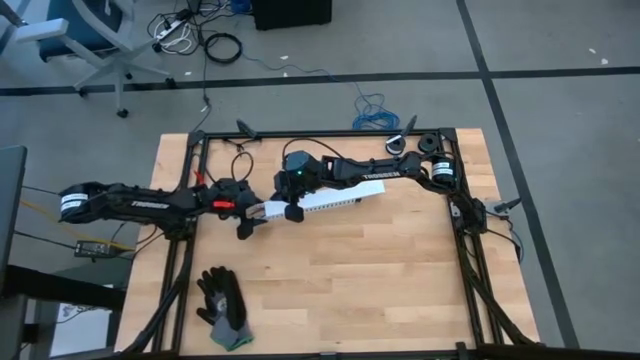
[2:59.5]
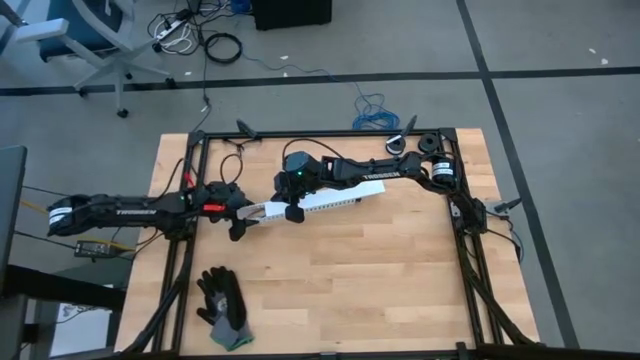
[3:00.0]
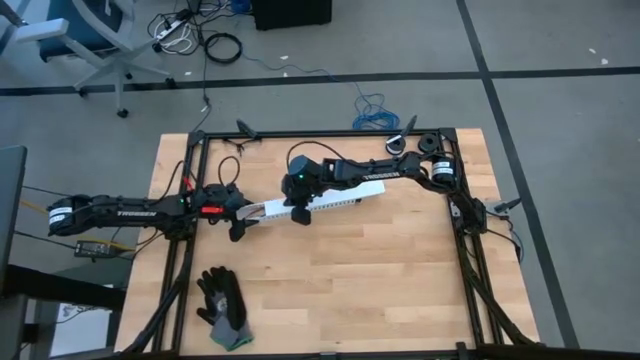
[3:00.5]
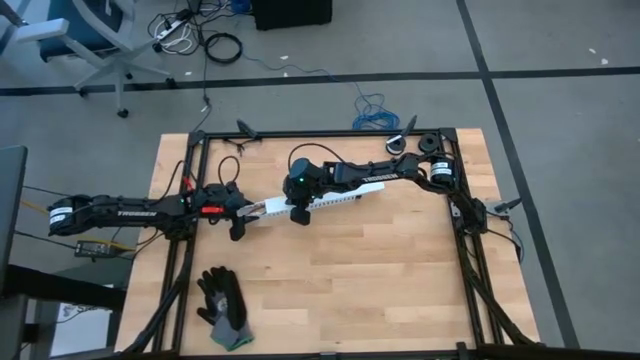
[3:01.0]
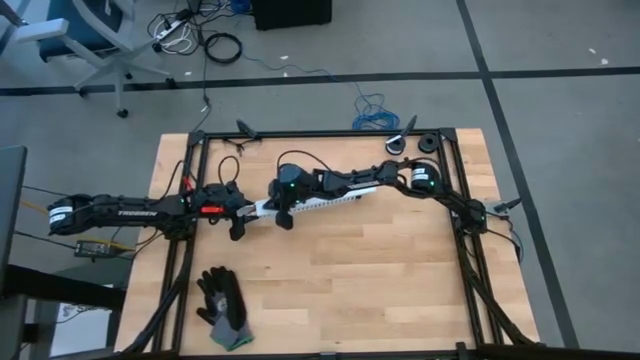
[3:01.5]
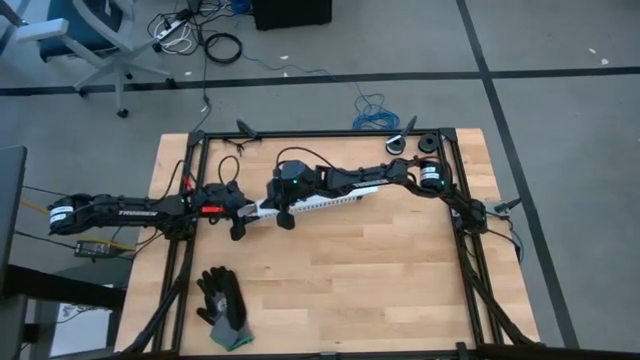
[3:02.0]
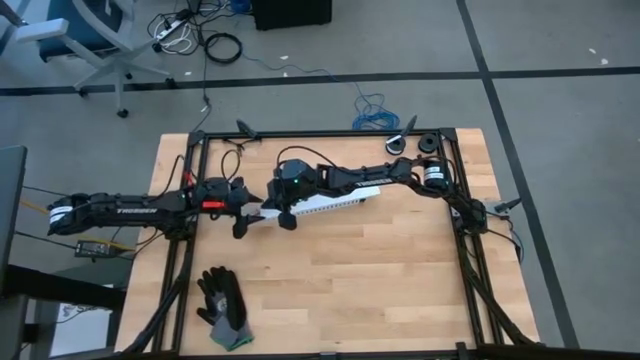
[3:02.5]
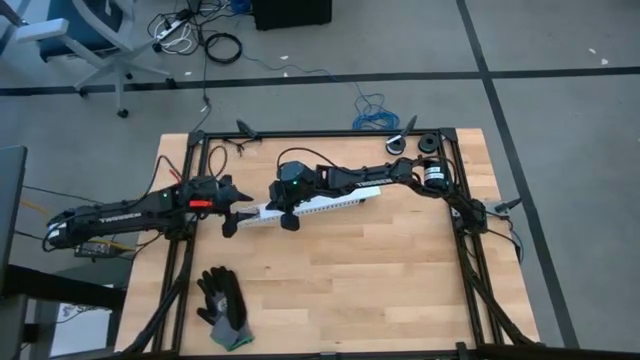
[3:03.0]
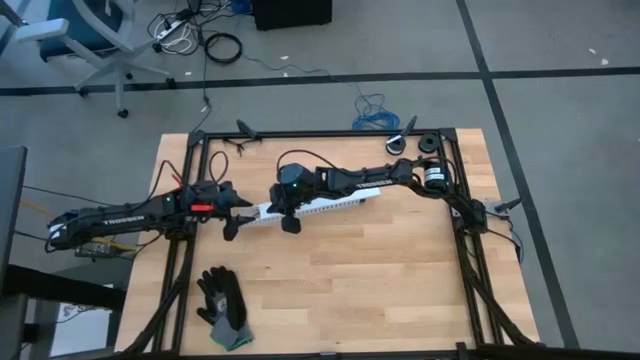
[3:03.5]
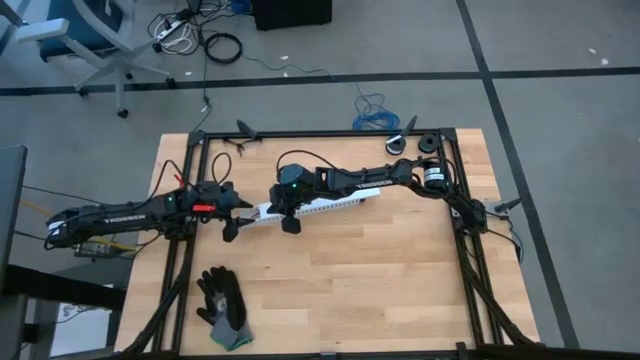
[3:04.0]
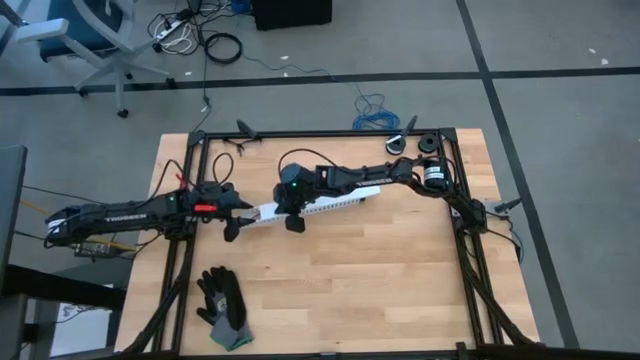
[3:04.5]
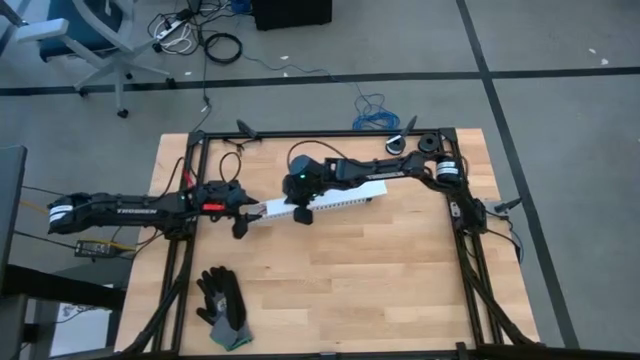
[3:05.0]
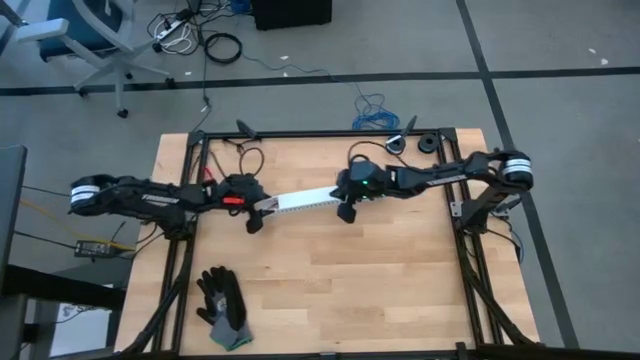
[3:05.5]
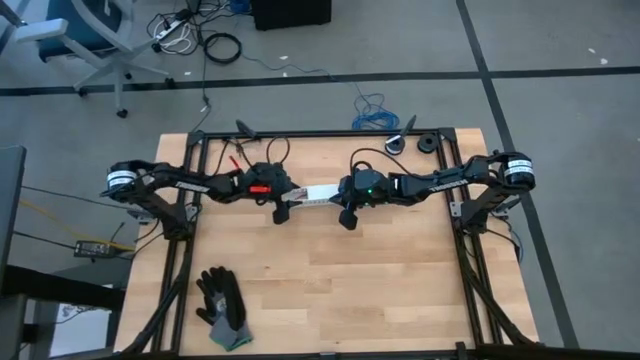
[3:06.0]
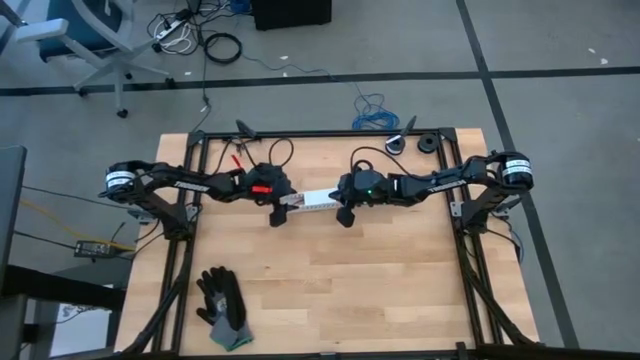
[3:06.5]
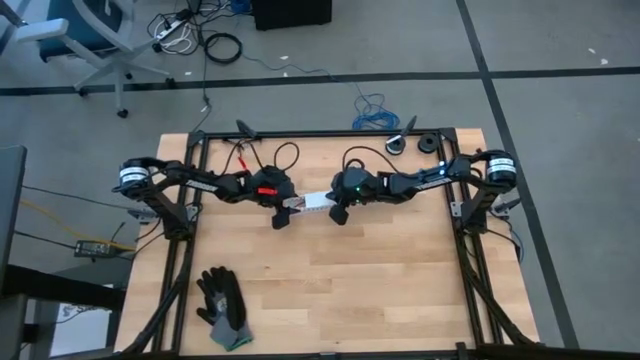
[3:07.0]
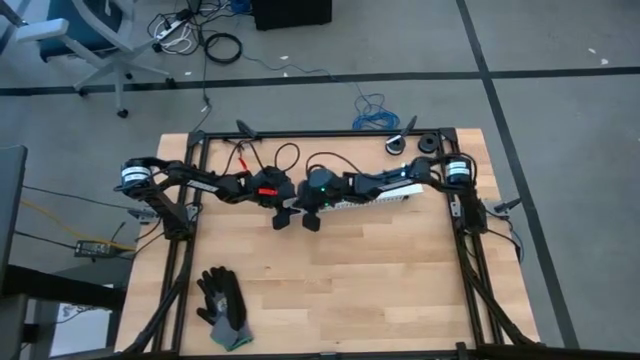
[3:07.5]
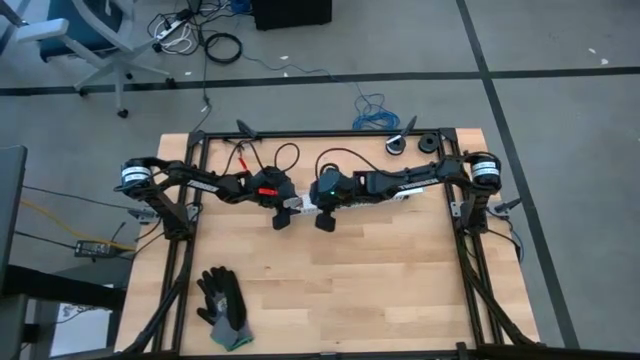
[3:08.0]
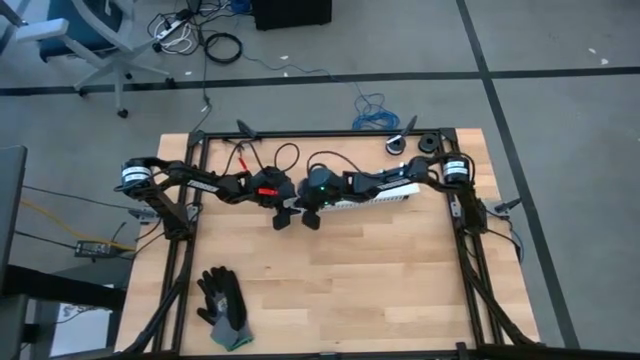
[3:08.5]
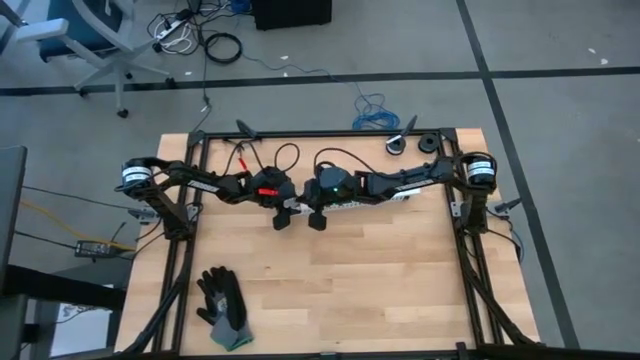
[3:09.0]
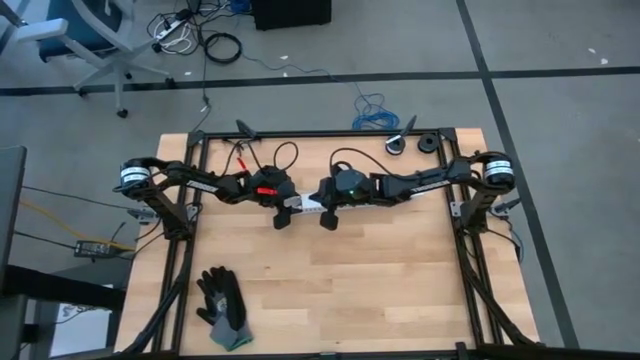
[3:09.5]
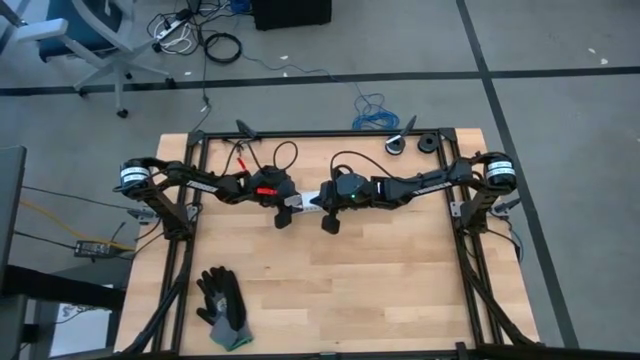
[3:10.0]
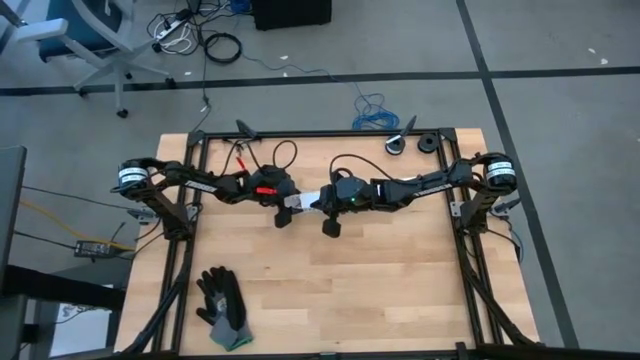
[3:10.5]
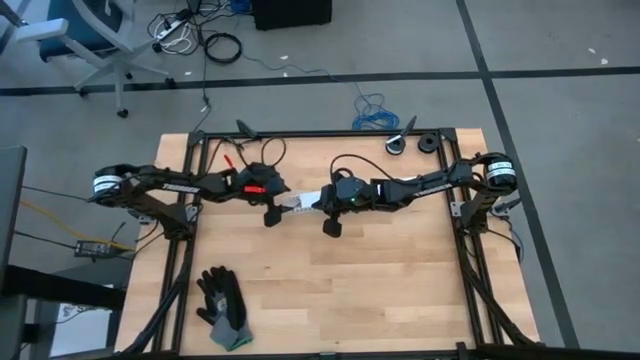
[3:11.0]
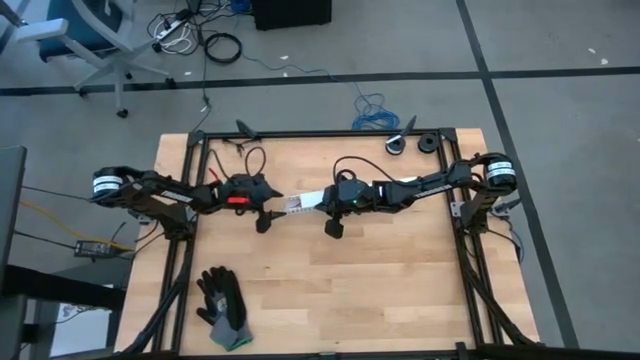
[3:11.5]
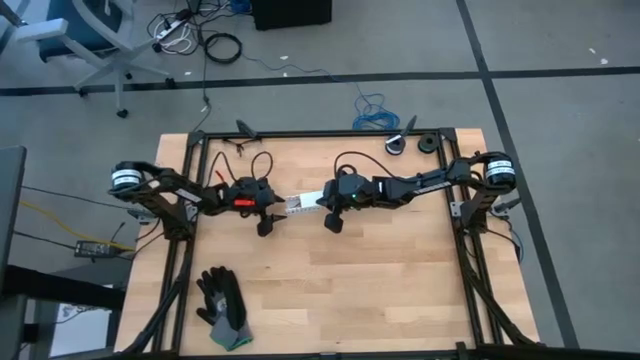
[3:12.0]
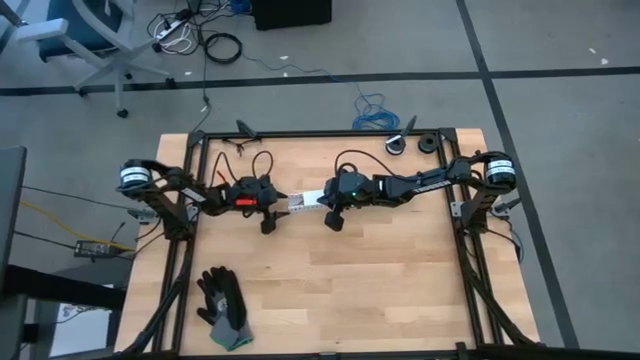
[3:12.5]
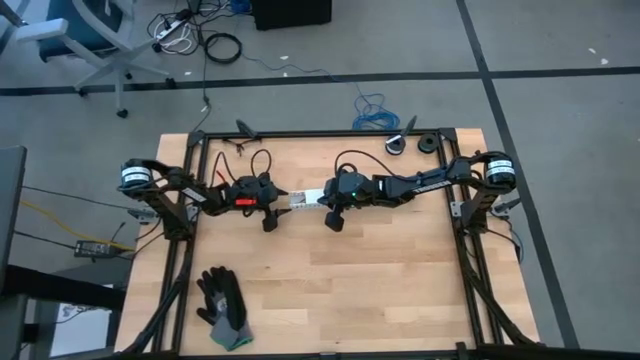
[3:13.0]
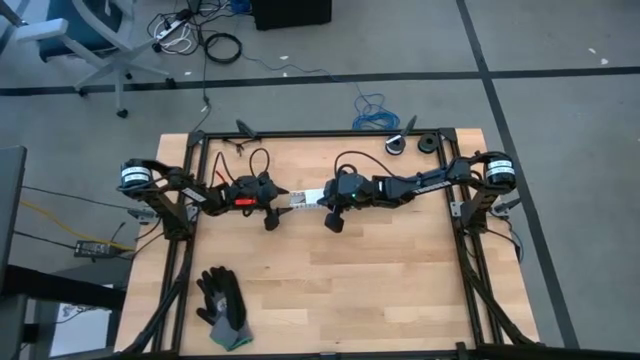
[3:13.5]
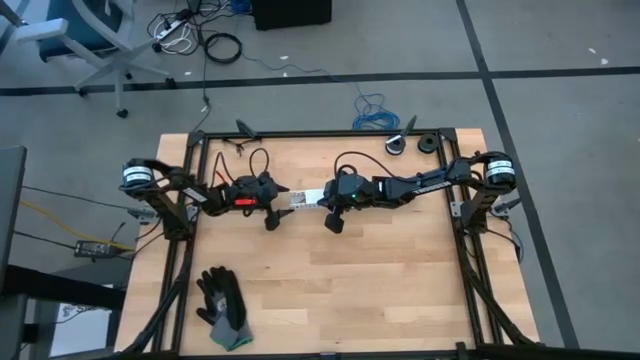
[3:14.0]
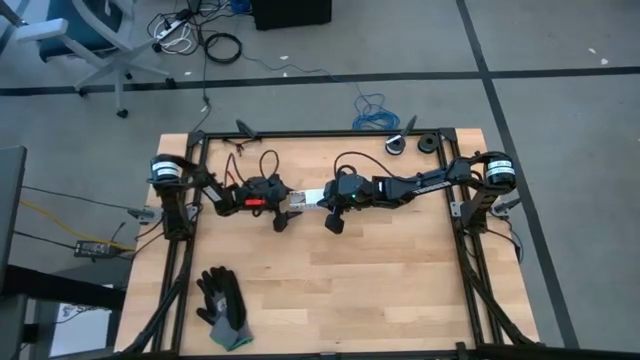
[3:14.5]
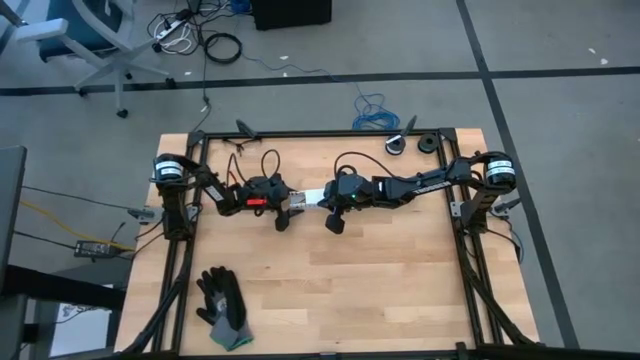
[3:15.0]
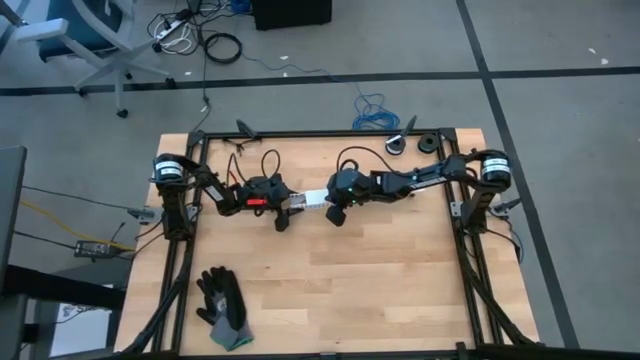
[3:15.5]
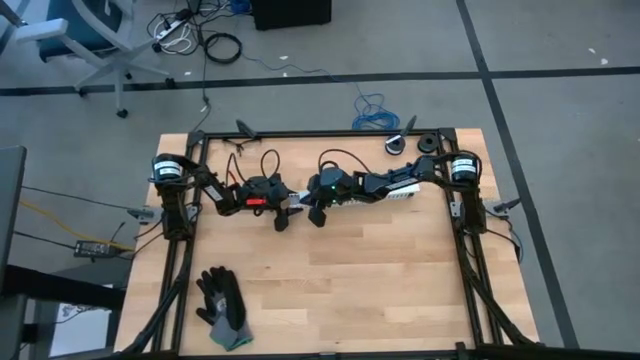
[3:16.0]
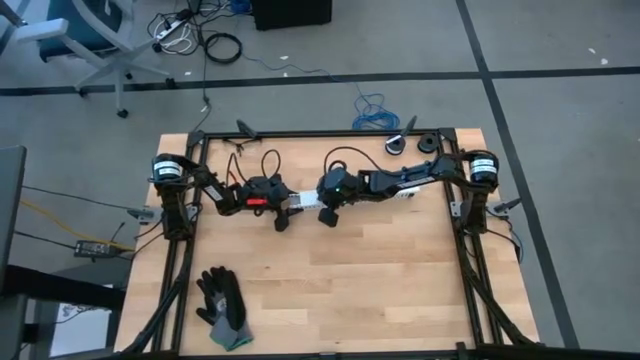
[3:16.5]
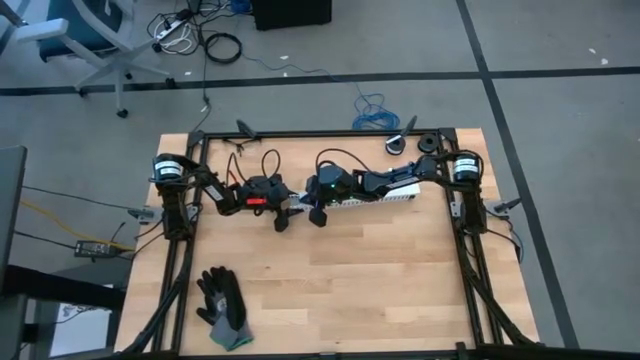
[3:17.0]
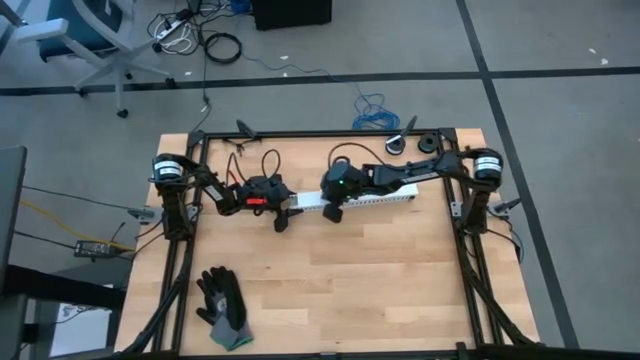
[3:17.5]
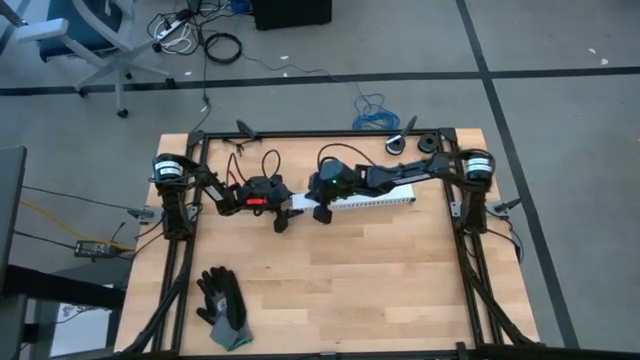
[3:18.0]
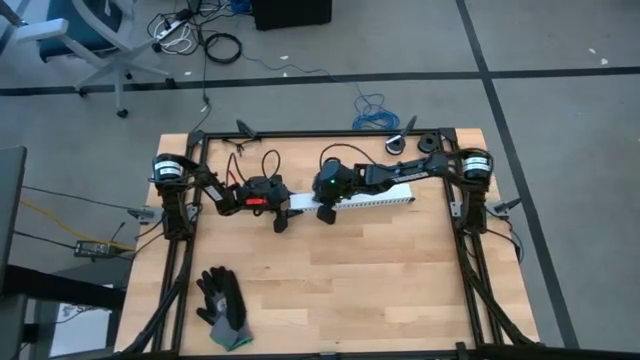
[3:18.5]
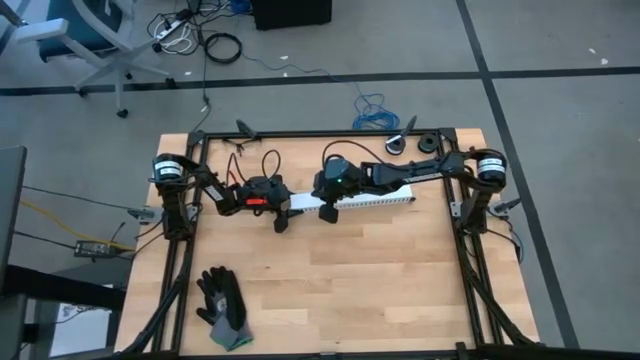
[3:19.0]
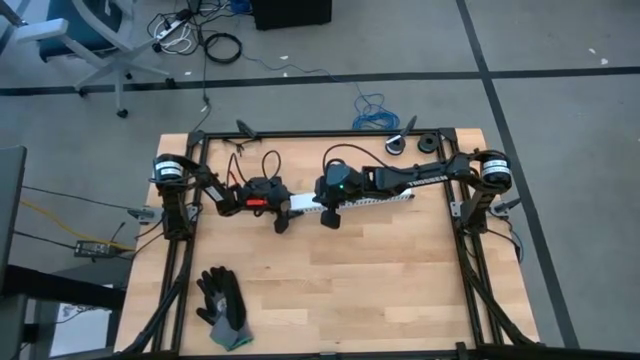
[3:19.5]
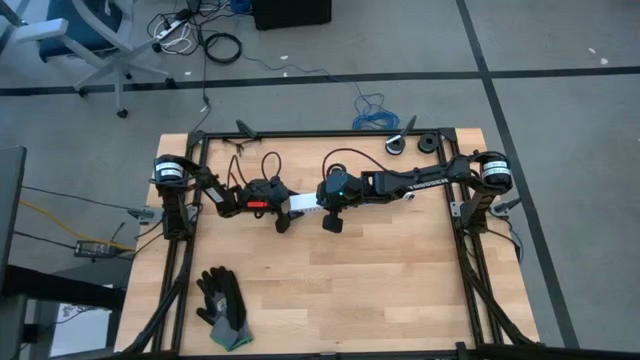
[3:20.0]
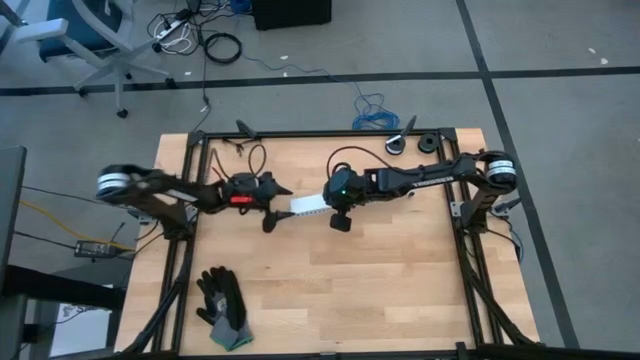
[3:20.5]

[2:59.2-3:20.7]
Task: Ziptie cables
Close the white cable duct with the cover
